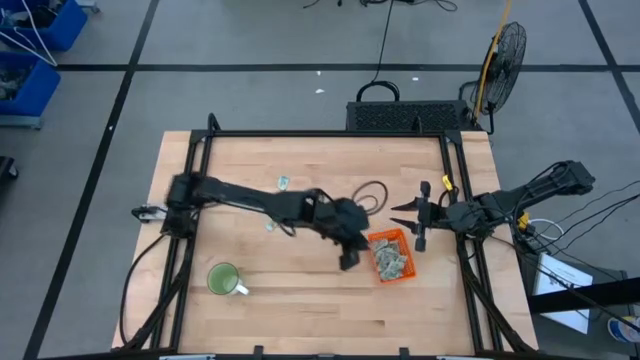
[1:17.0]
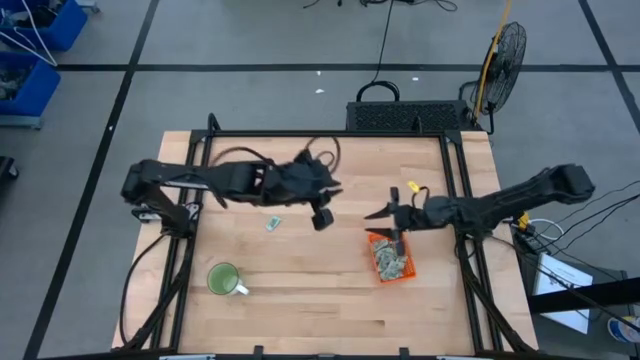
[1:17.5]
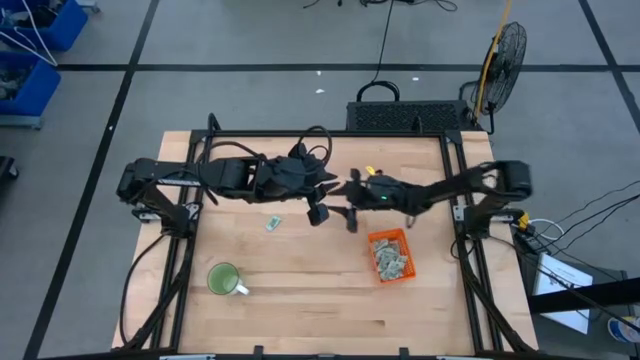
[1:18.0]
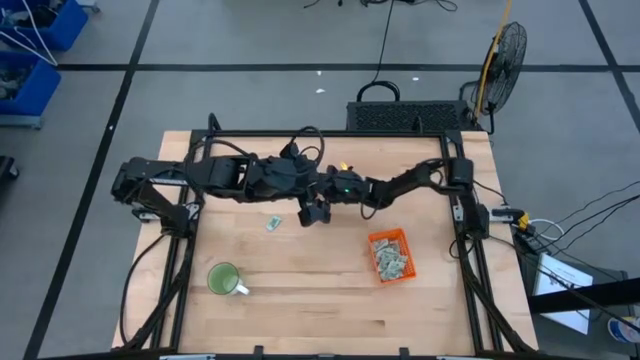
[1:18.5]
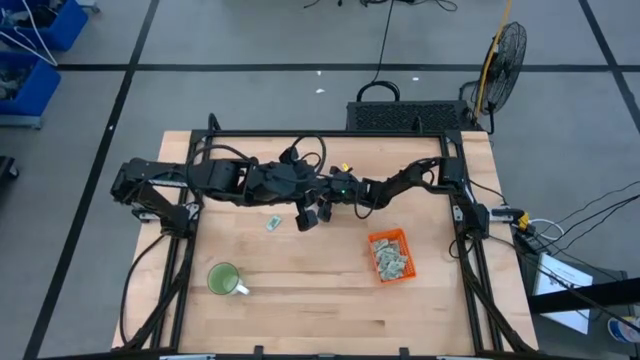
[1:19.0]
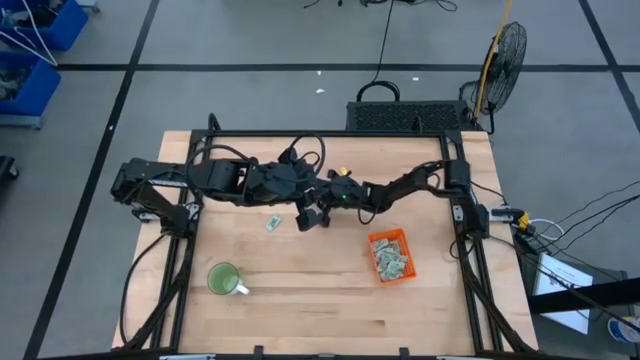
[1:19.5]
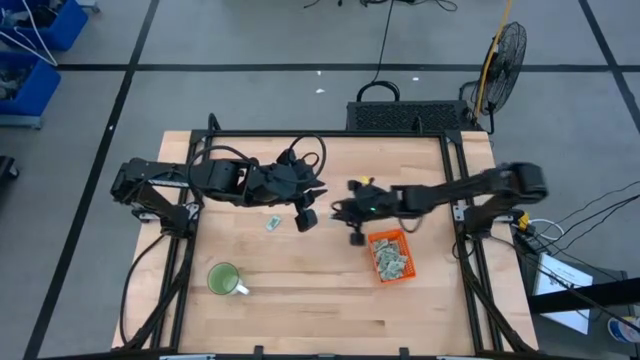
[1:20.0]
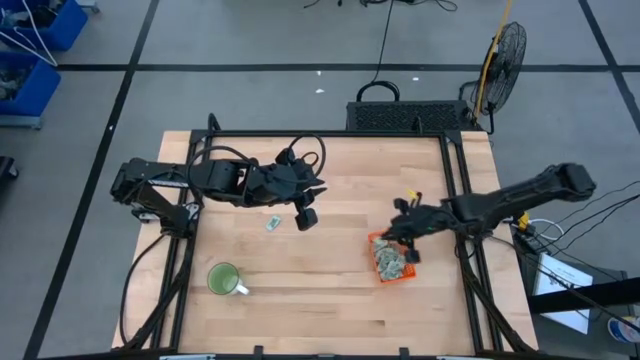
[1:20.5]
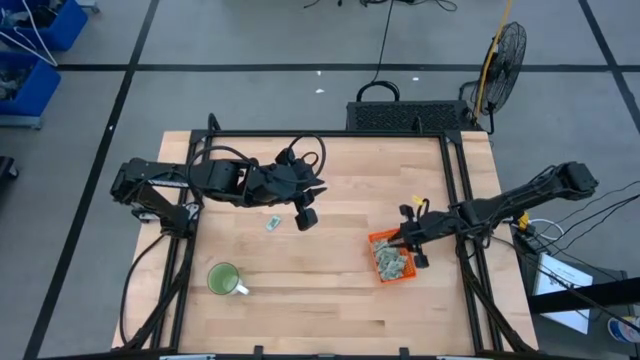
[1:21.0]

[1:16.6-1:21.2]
Task: Pick and place Stevia / Truvia into bins
Put the stevia packet into the orange basket

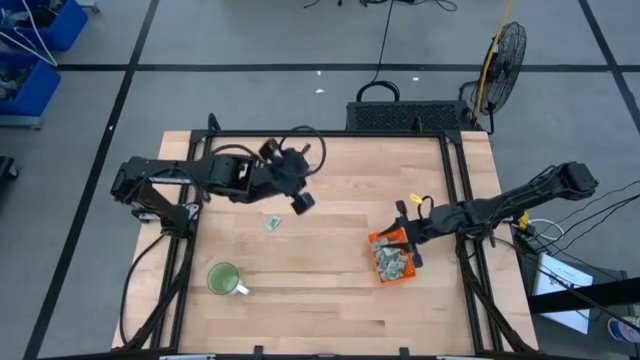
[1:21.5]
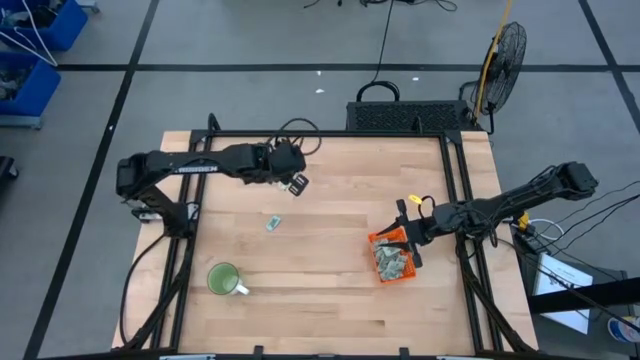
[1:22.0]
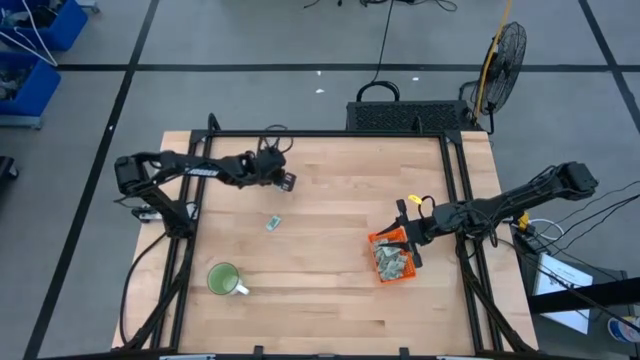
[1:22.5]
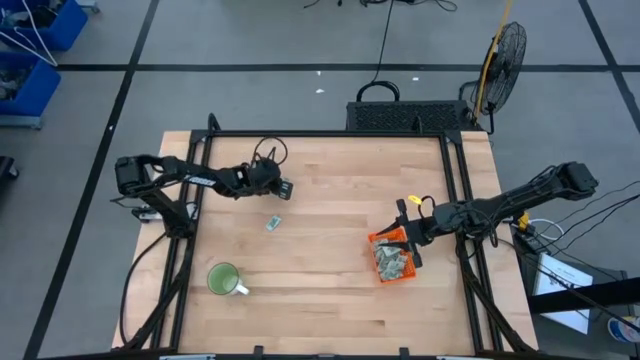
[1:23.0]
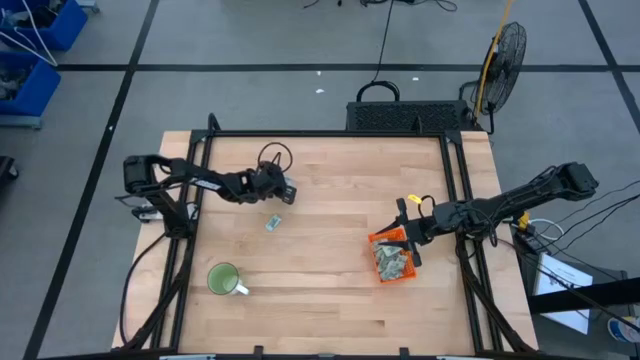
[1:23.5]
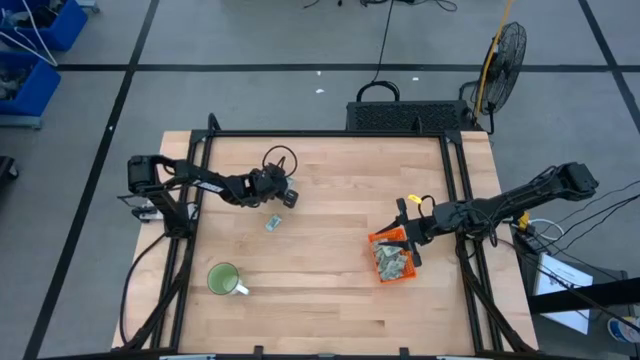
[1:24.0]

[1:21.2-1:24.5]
Put the stevia packet into the orange basket

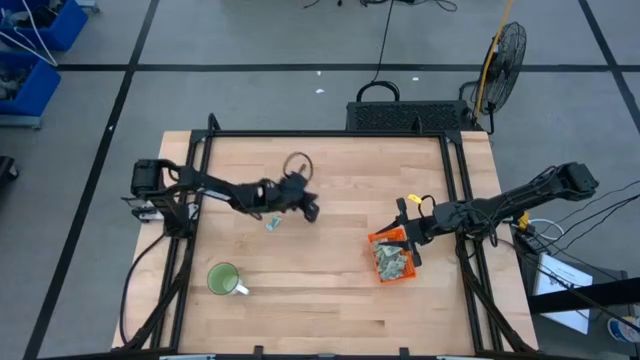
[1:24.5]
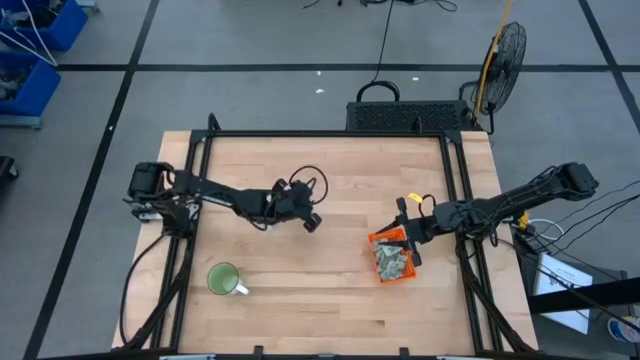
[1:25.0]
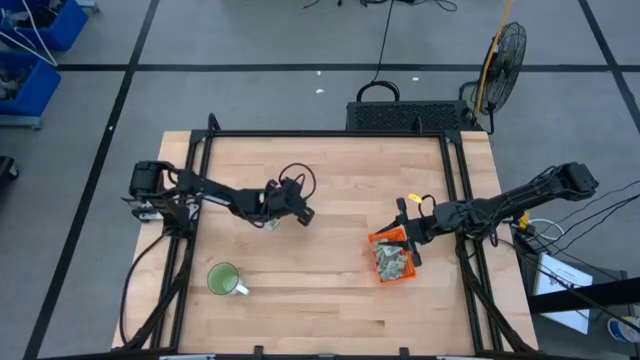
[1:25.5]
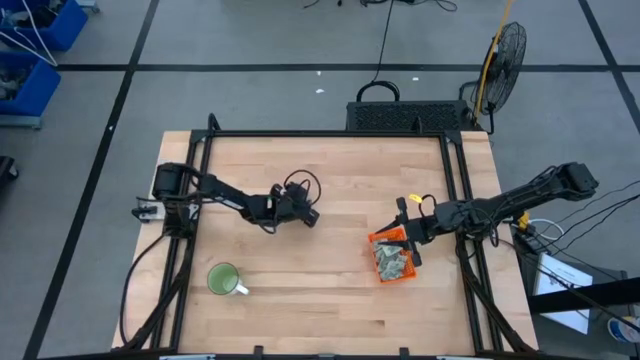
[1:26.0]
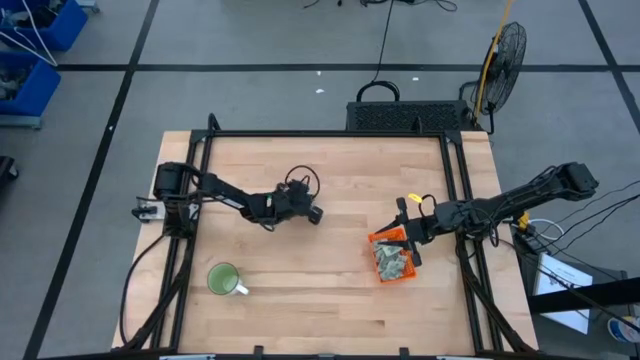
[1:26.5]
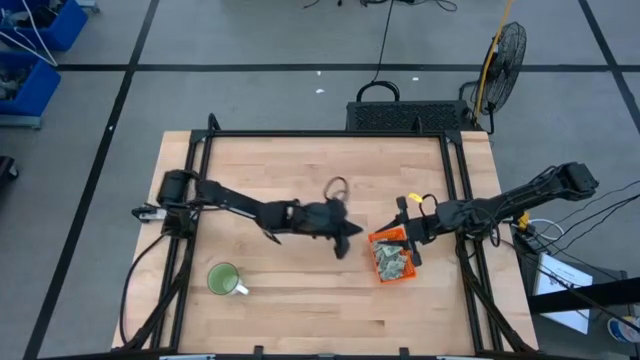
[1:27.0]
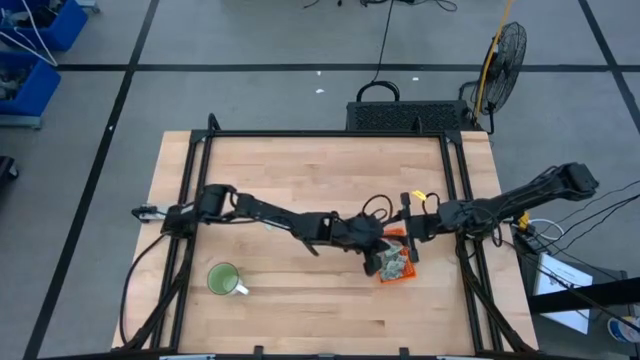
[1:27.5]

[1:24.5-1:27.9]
Put the stevia packet into the orange basket

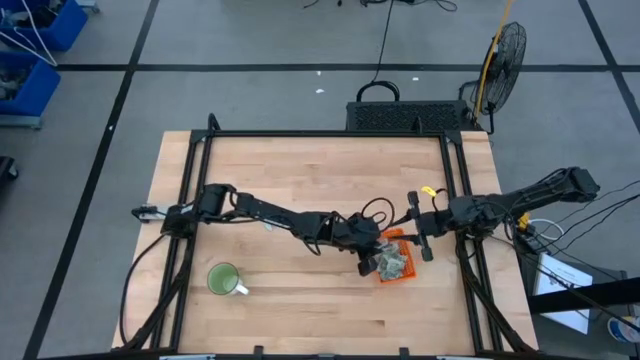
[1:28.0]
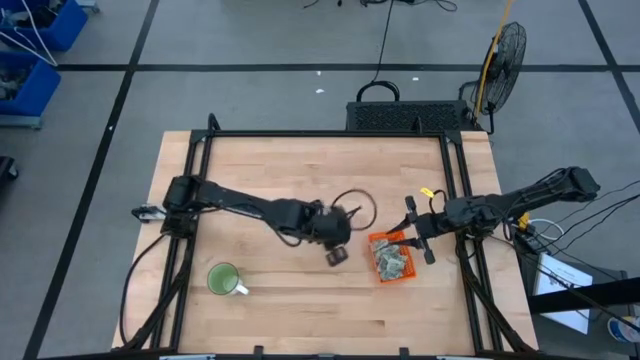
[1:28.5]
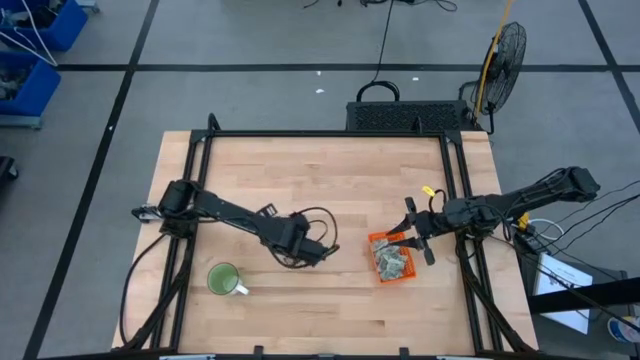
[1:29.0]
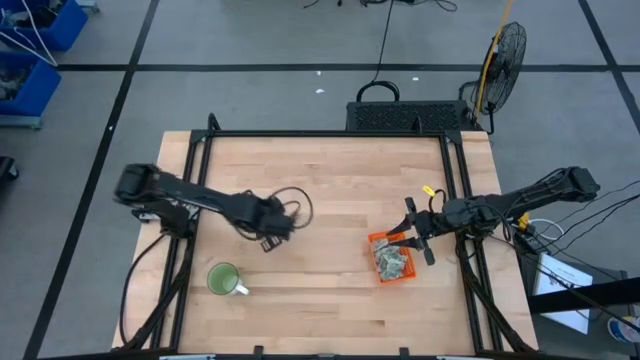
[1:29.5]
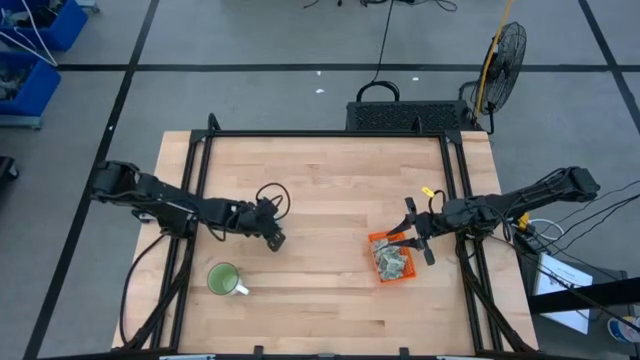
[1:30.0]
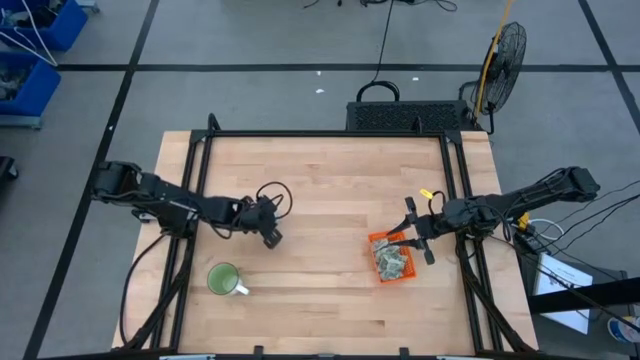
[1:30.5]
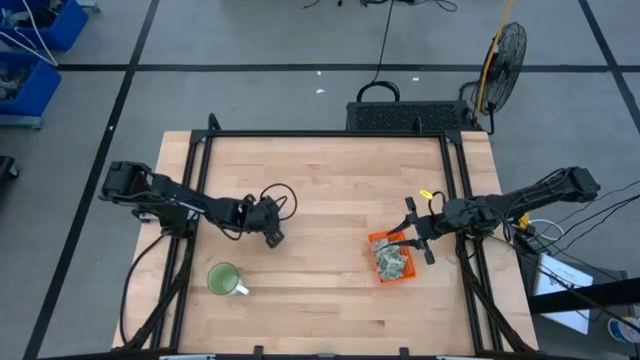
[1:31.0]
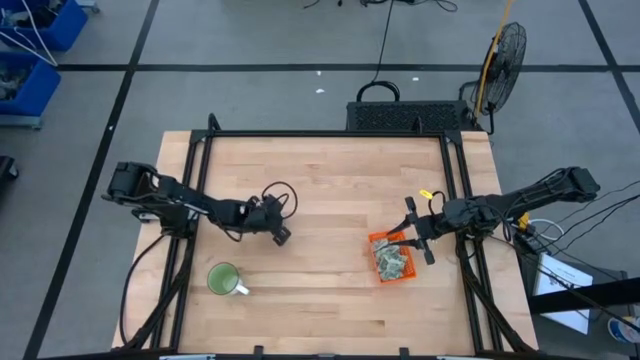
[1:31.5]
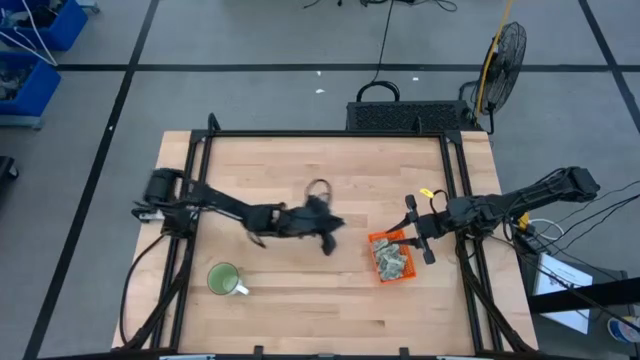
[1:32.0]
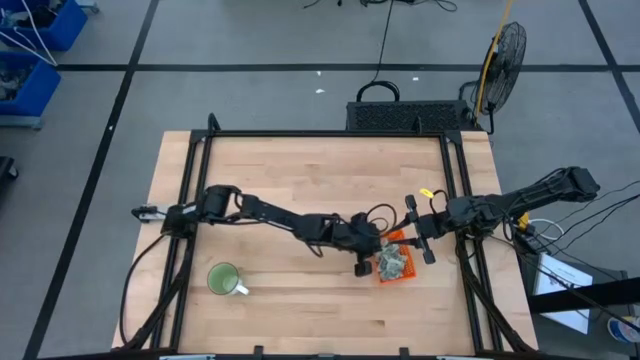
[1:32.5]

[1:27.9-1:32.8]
Put the stevia packet into the orange basket

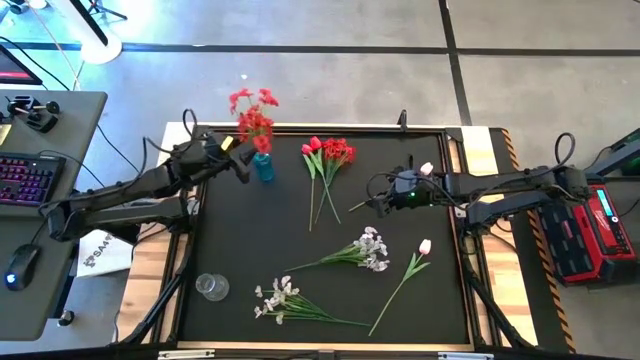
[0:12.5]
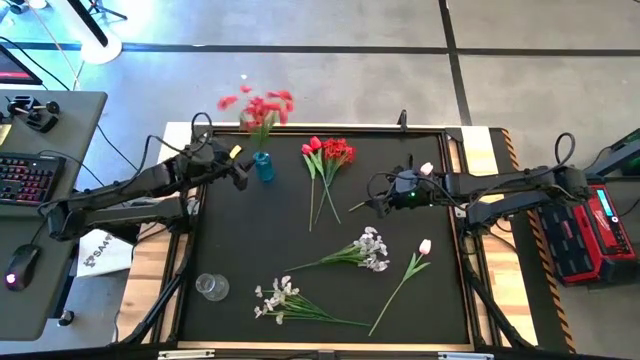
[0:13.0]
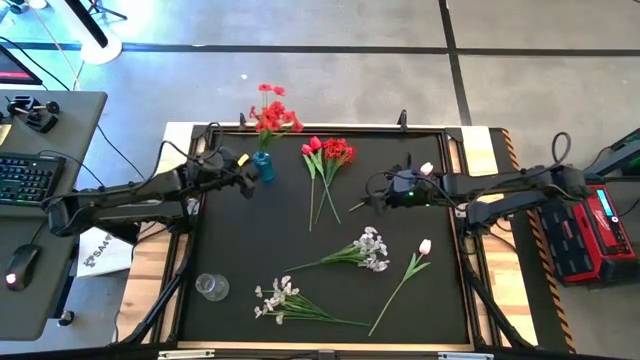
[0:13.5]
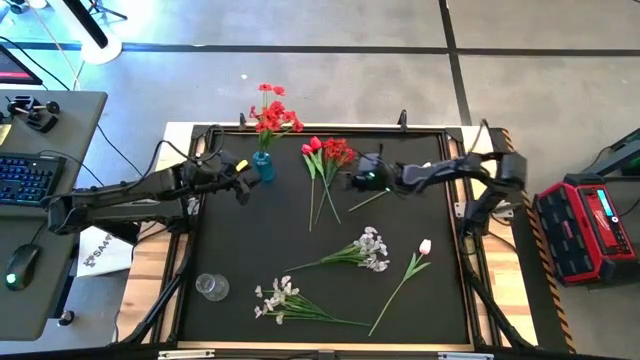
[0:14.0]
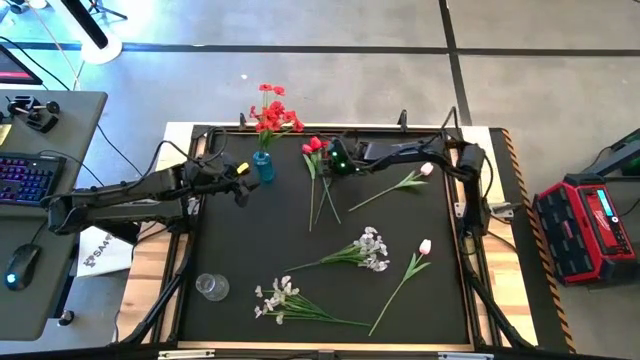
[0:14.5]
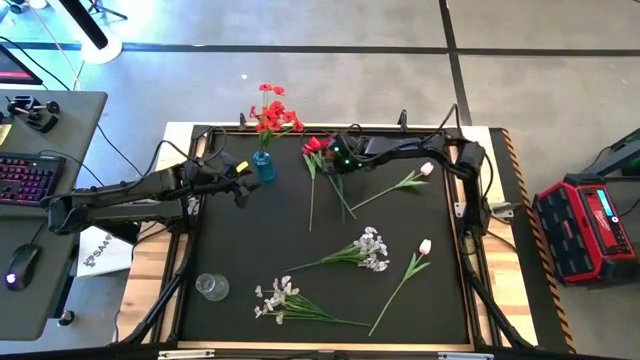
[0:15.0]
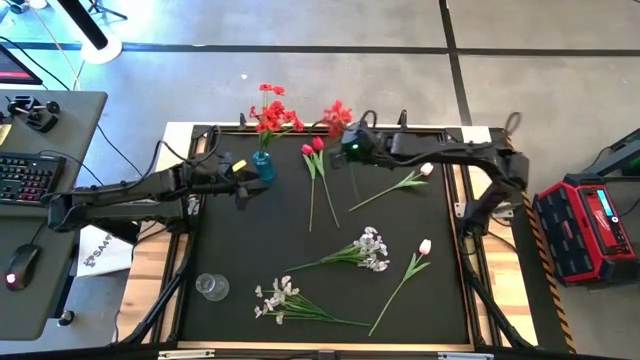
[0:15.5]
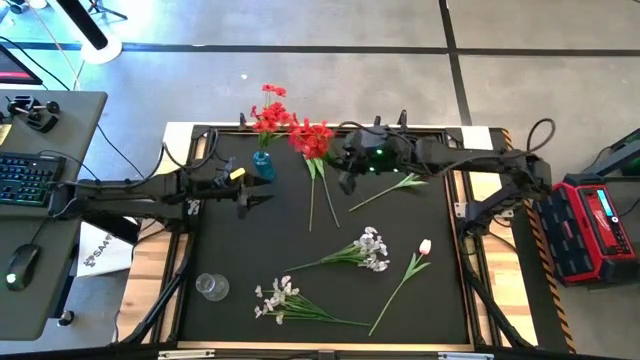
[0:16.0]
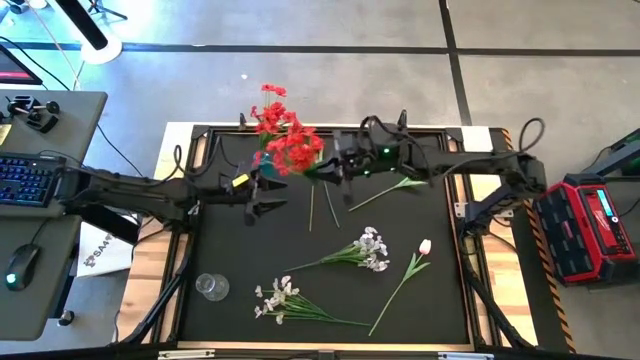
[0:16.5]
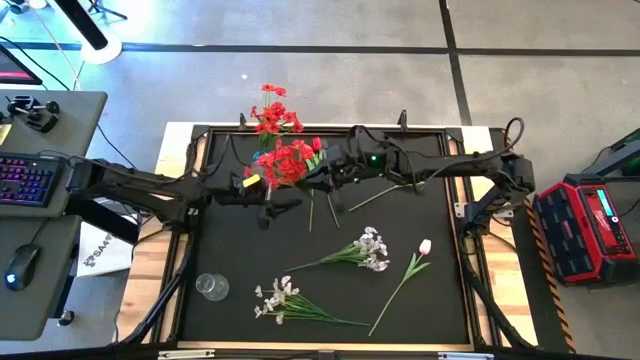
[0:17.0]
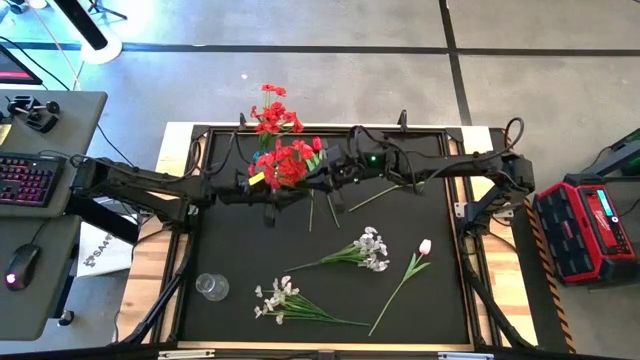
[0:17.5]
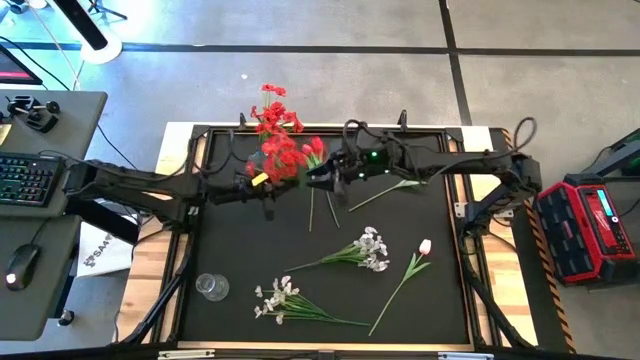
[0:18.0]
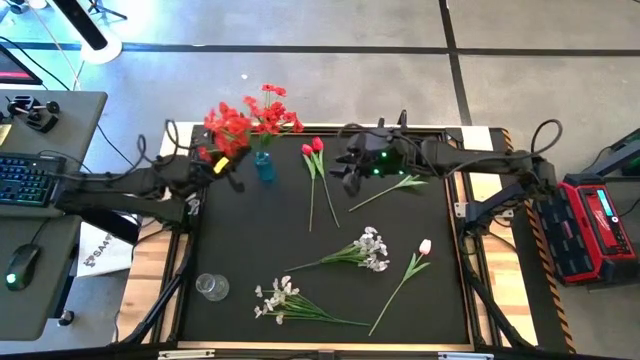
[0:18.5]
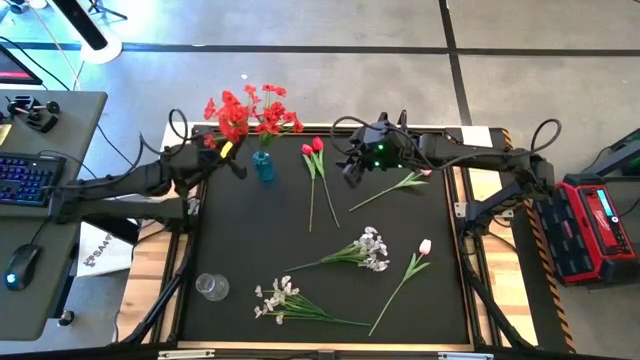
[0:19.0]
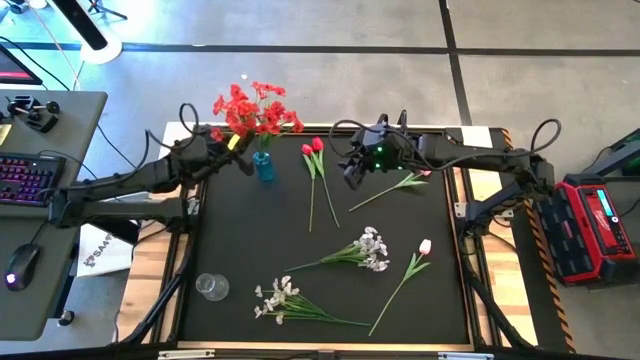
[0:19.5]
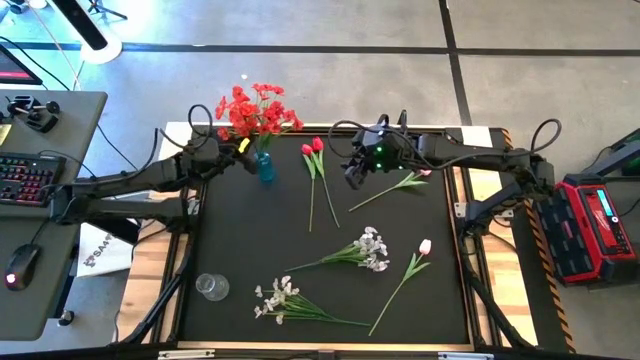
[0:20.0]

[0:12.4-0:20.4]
Task: Sort flowers into vase by color
Put the red flower into the blue vase
